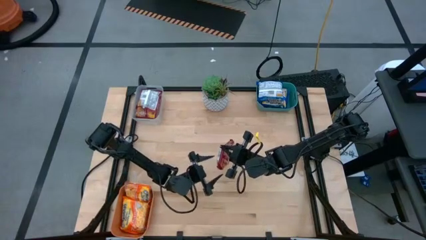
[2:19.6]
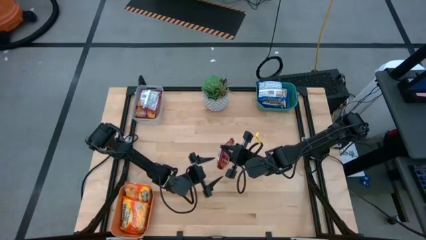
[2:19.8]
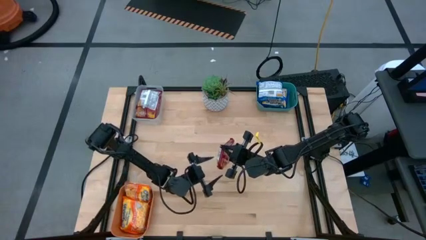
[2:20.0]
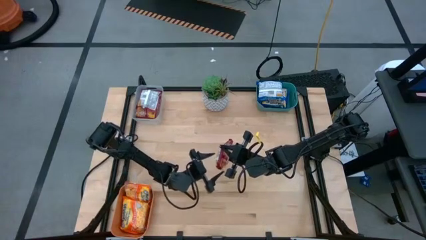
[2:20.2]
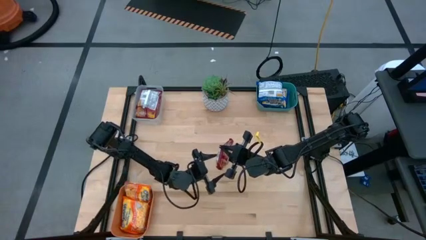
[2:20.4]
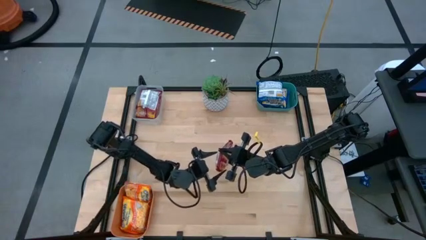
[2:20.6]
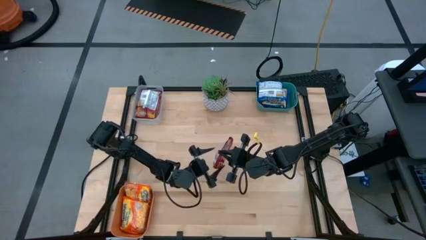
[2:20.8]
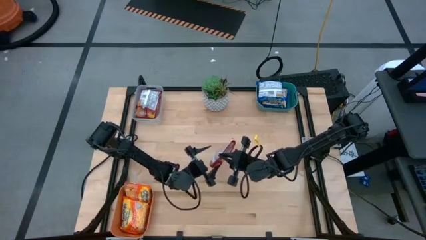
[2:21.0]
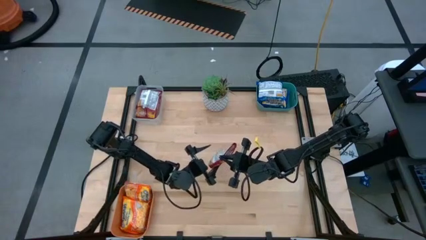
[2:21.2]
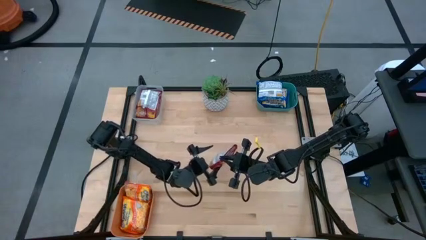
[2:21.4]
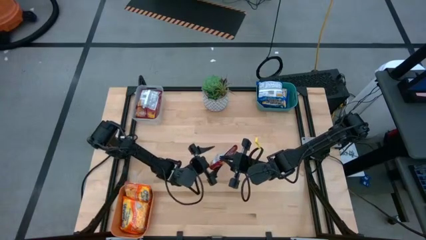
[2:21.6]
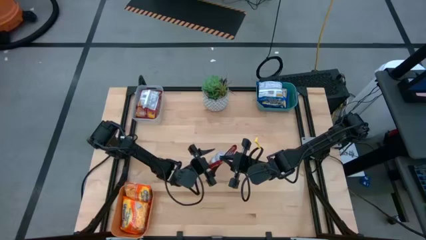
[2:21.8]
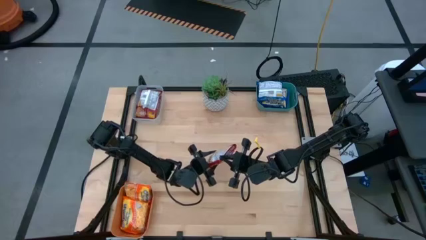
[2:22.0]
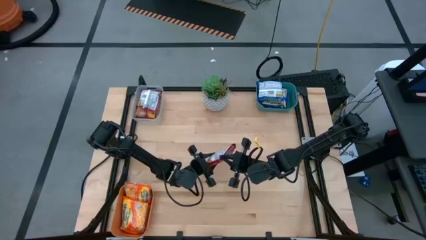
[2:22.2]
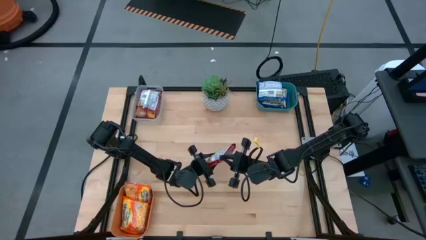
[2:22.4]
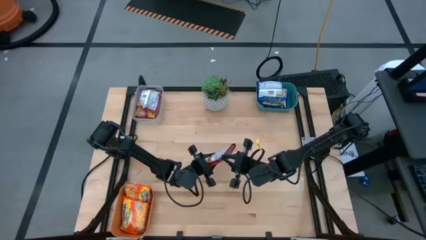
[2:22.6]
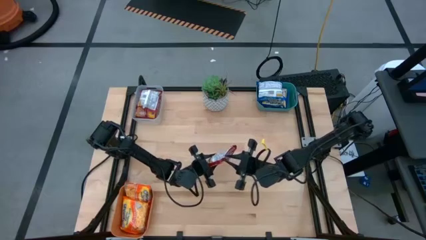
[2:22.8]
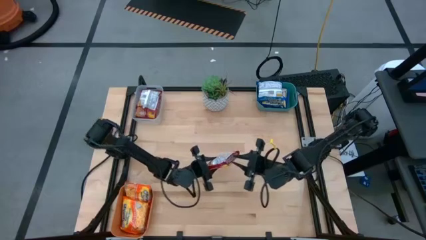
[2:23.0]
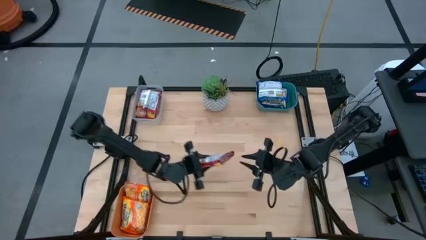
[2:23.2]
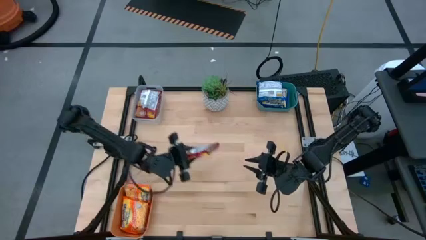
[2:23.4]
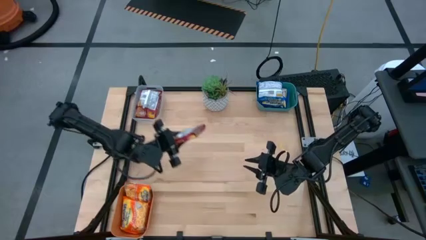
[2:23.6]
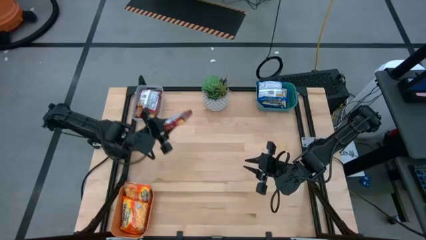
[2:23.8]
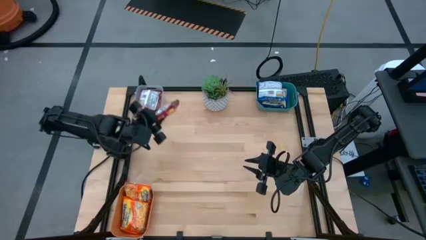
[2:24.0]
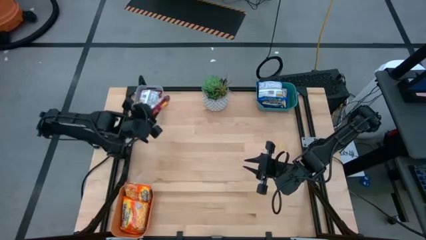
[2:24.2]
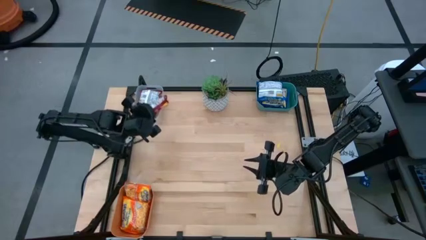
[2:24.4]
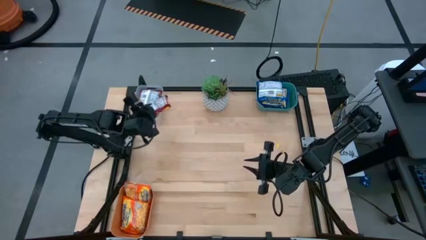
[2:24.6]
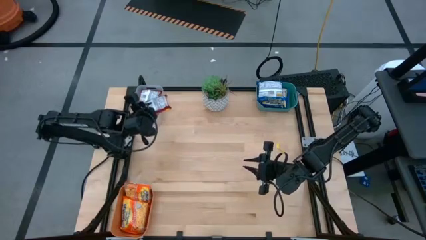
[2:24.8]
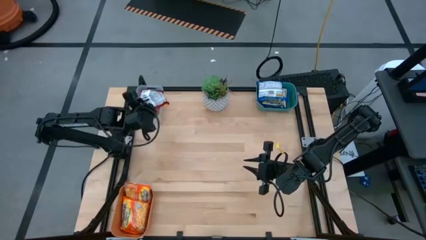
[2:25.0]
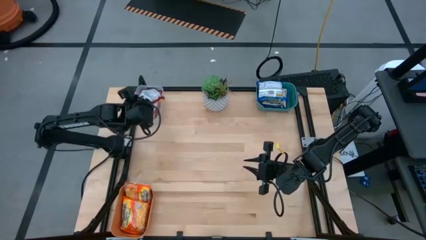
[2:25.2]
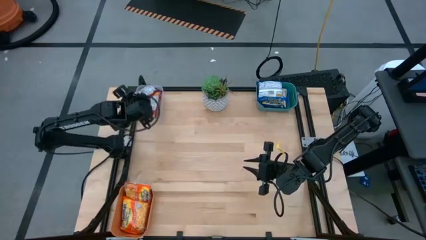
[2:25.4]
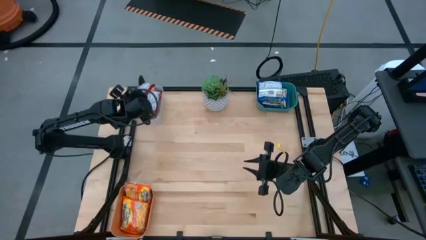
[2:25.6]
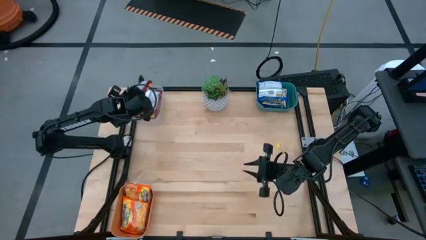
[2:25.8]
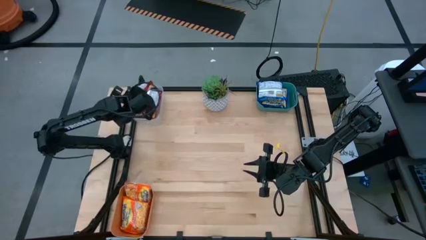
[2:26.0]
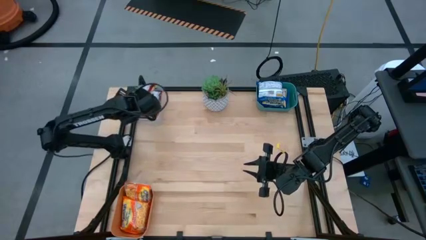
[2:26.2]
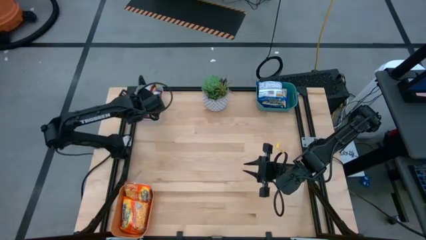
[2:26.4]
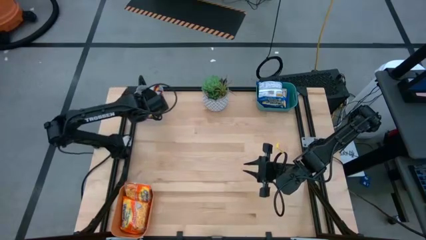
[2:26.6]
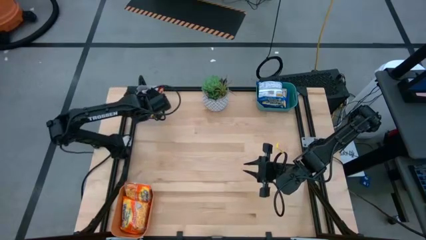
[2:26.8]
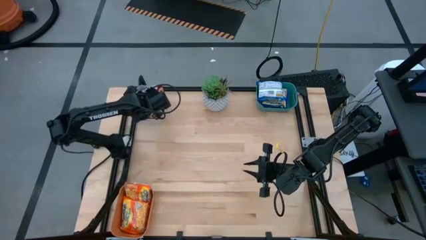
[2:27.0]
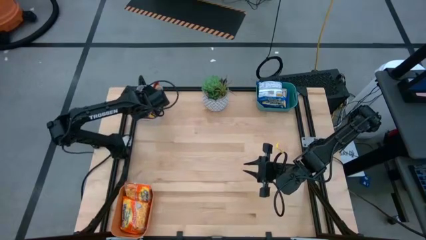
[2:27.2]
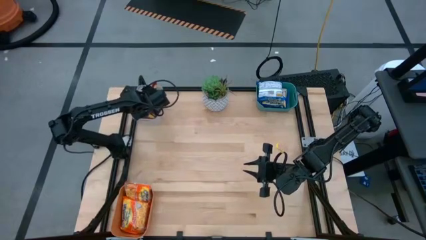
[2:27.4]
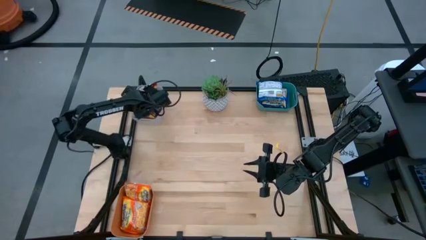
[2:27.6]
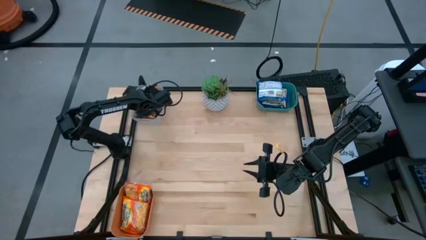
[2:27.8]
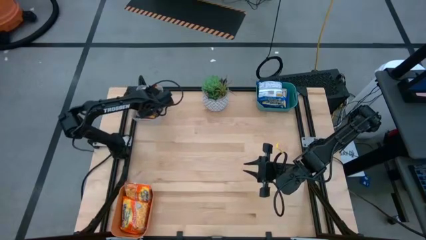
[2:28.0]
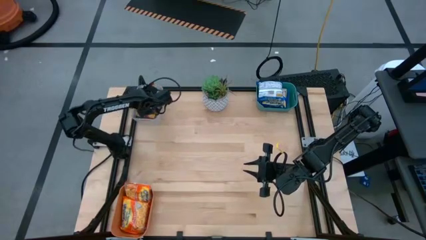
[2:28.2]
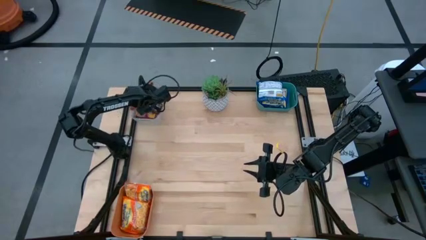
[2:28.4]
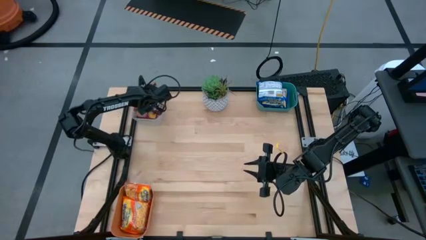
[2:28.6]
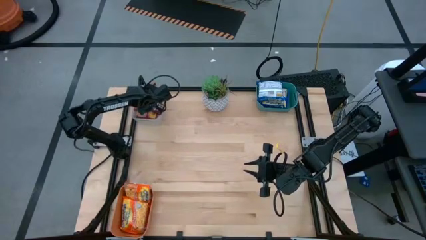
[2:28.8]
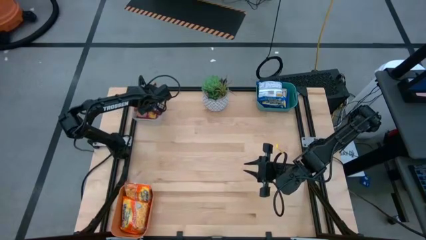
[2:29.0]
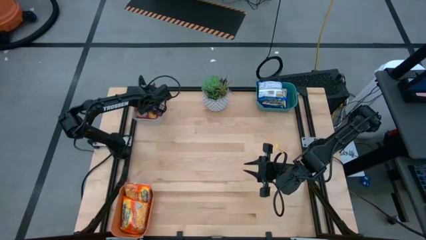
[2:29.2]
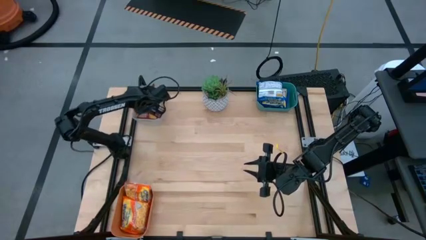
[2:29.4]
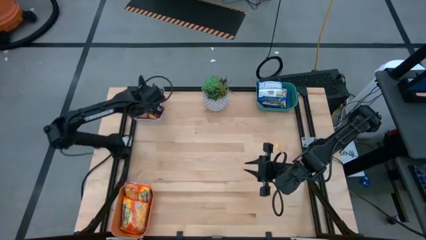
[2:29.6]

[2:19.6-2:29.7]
Task: Sort Maruchan noodles
Put the red noodle pack into the transparent bin

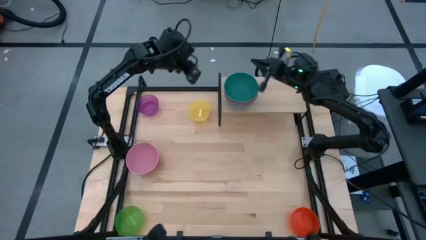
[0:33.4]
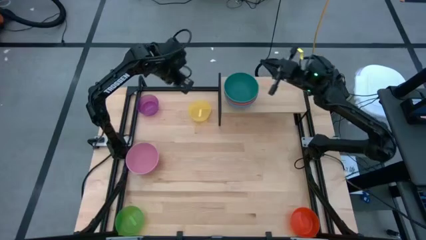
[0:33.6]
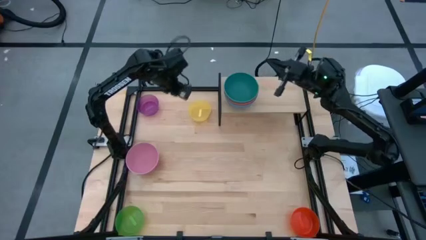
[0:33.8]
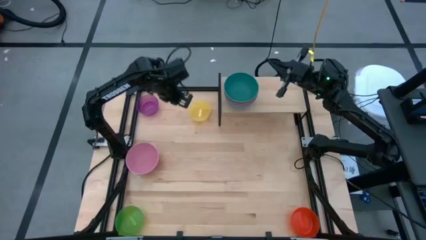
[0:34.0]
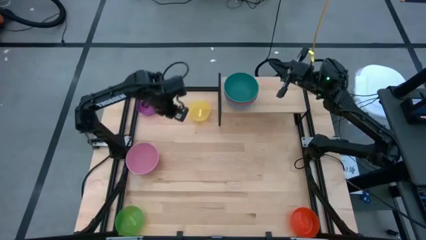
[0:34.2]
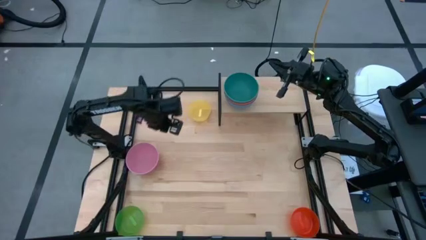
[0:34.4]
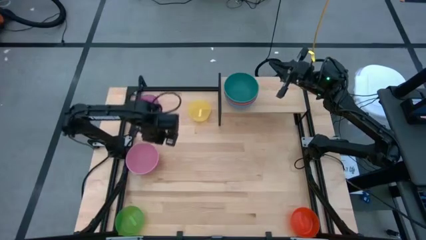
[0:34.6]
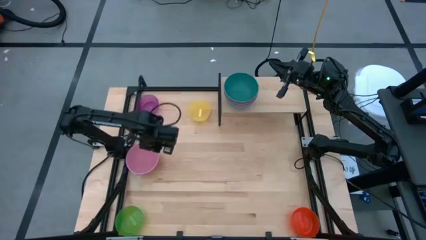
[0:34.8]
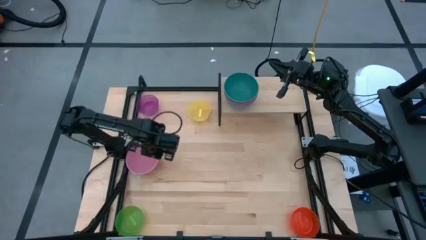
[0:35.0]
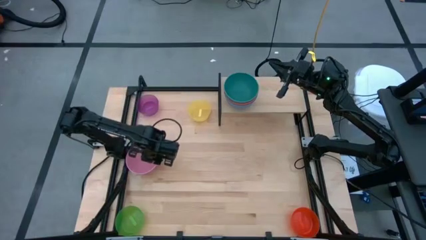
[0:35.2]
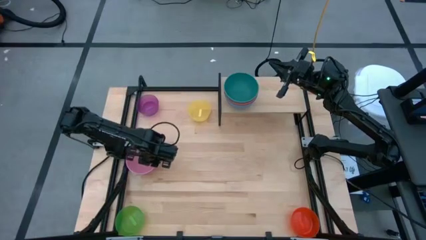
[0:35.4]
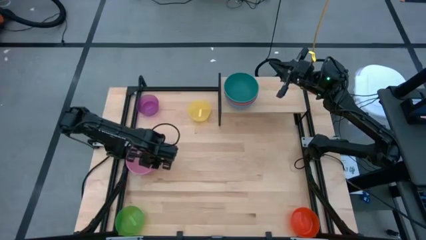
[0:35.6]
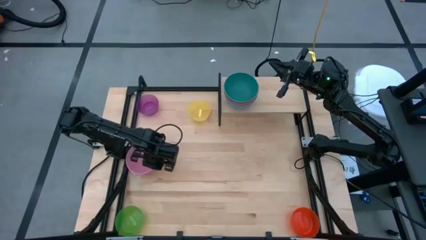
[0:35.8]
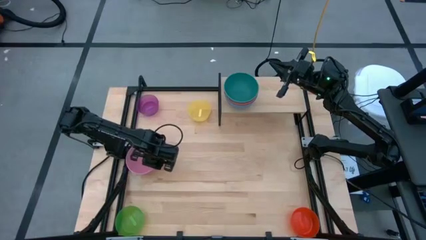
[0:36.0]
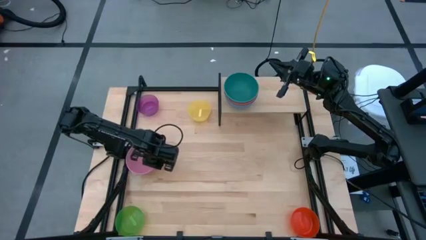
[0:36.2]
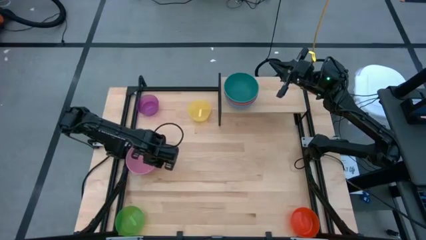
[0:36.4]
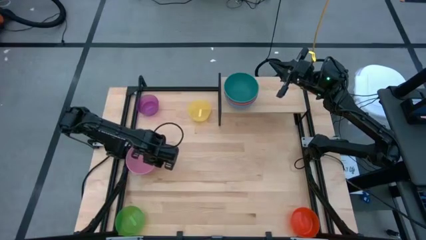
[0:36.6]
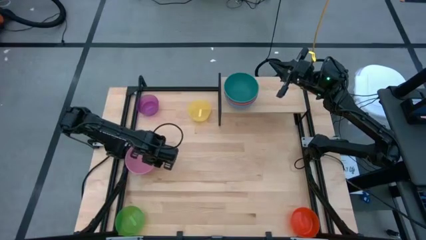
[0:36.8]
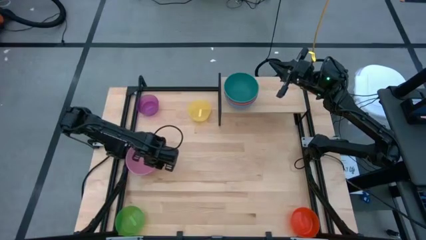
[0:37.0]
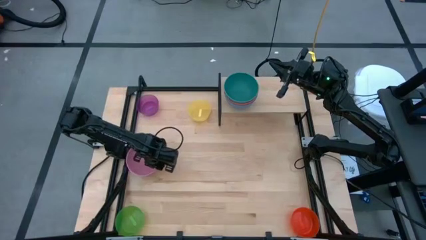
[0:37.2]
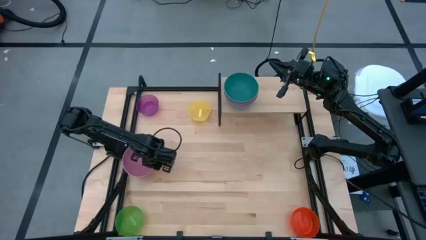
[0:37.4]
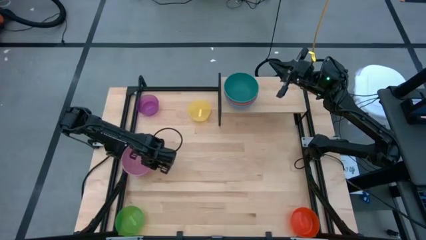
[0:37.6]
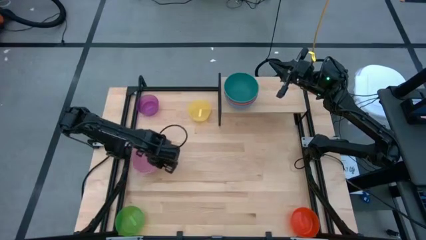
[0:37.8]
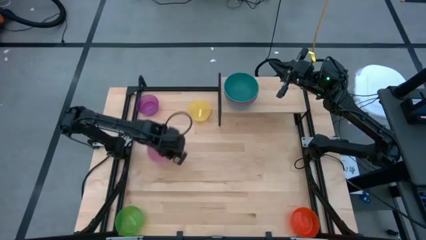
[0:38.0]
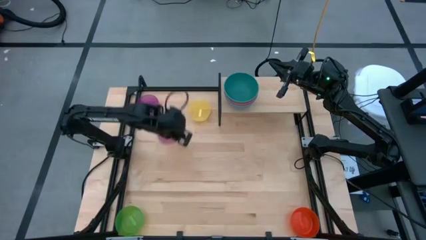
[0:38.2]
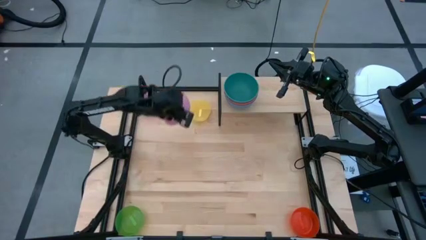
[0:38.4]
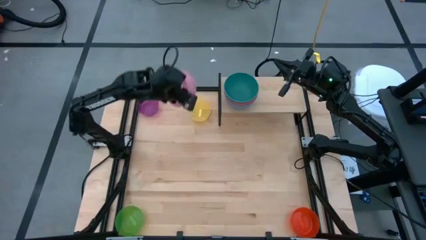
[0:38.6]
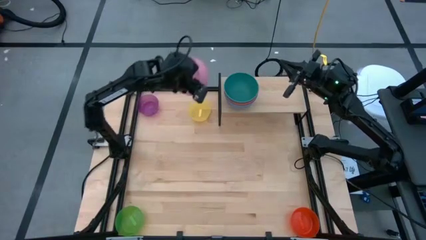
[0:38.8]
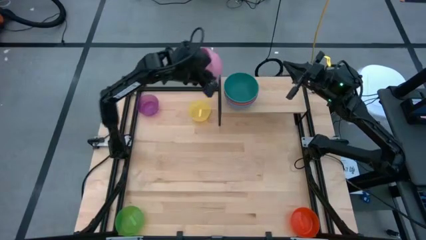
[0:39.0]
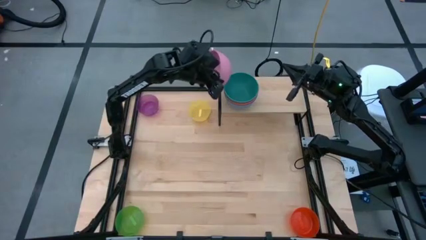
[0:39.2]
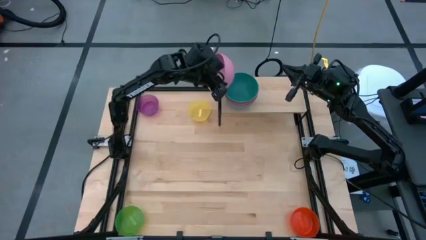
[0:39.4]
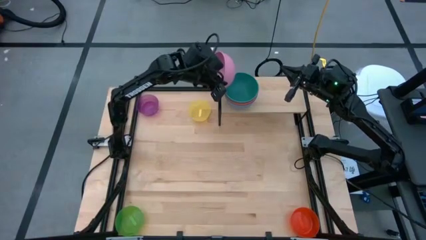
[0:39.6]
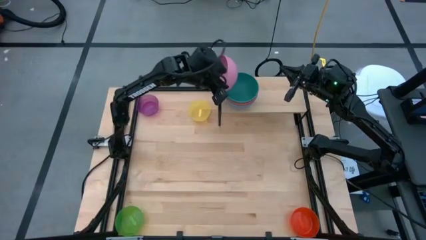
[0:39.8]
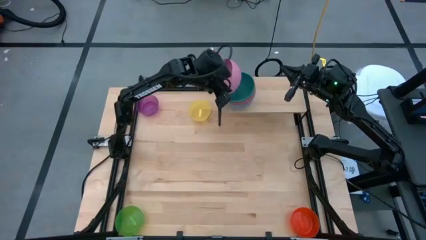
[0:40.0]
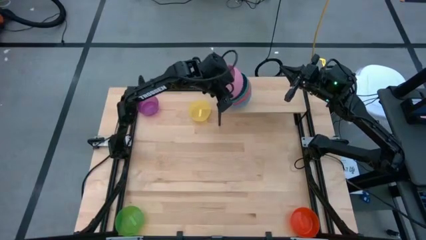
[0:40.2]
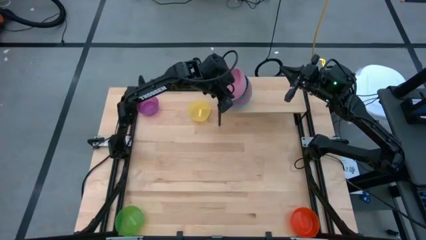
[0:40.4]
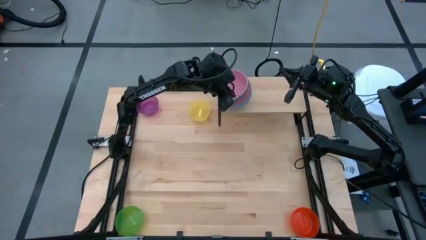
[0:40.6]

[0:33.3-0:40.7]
Task: Place and stack bowls onto a shelf
Stack the pink bowl on the shelf
